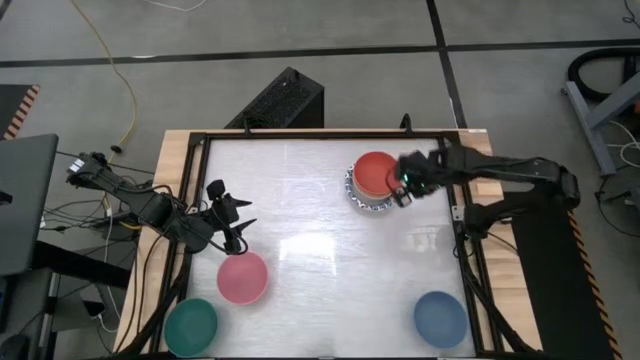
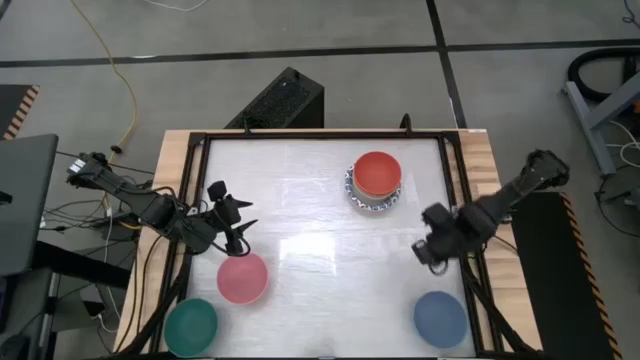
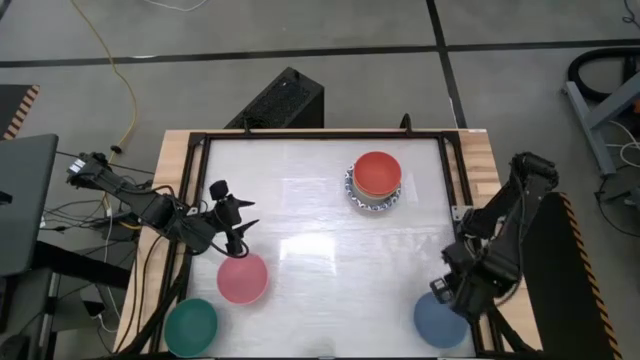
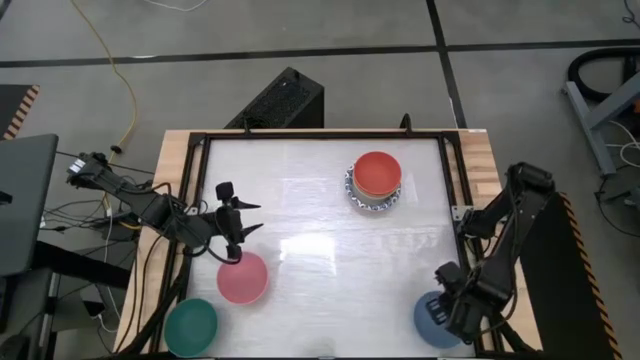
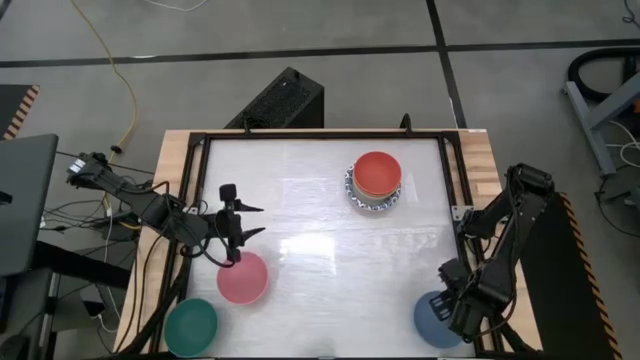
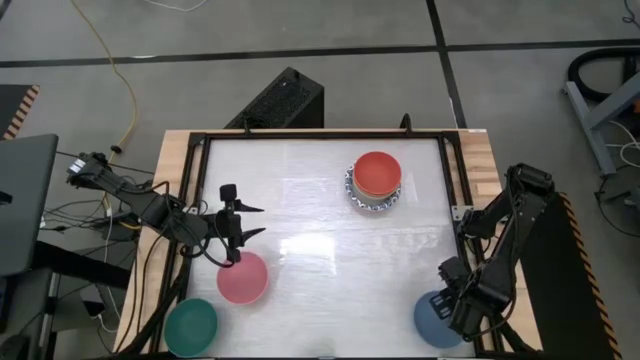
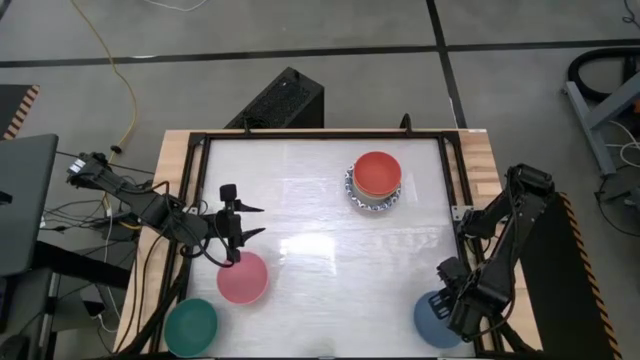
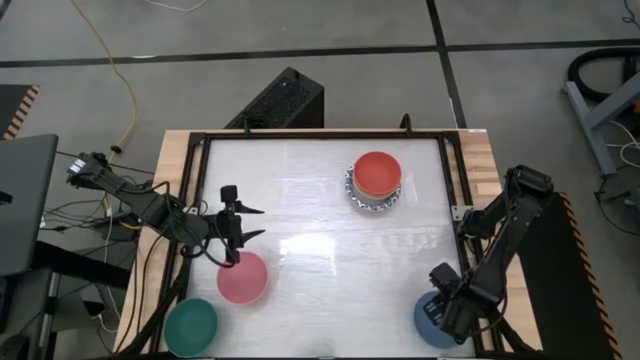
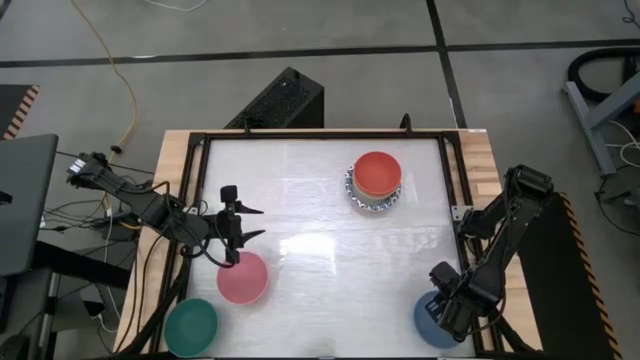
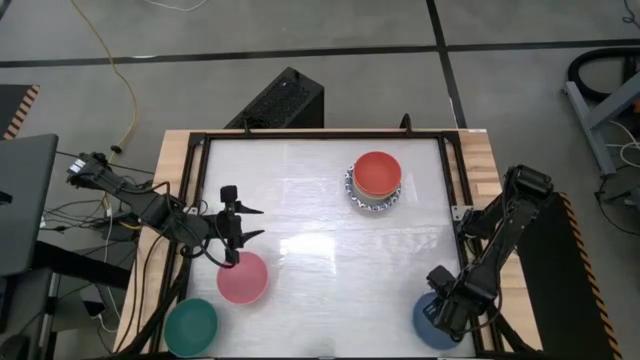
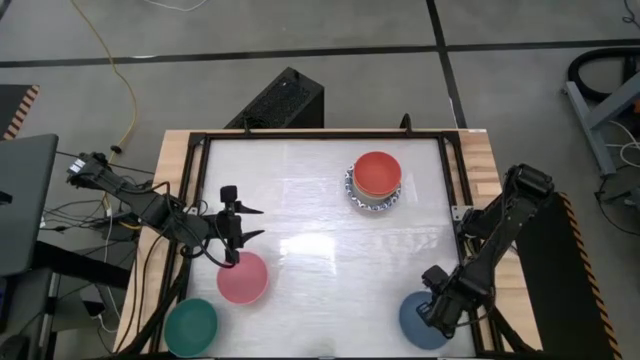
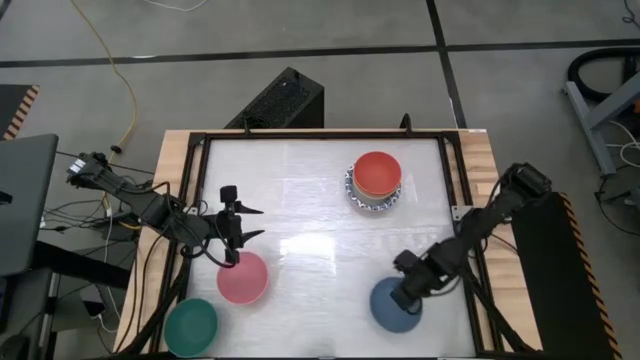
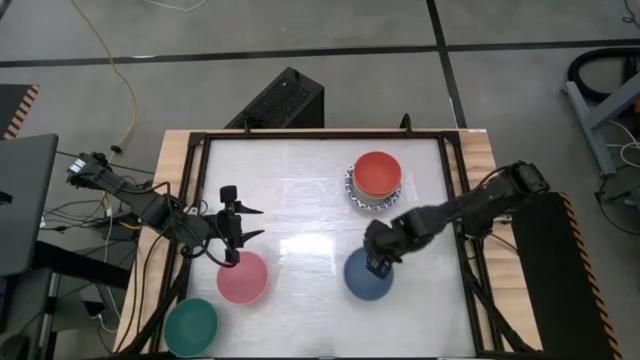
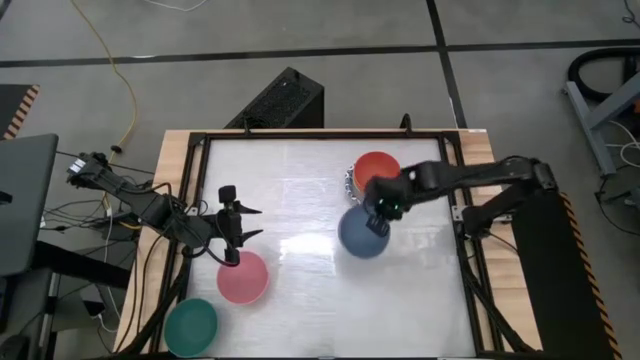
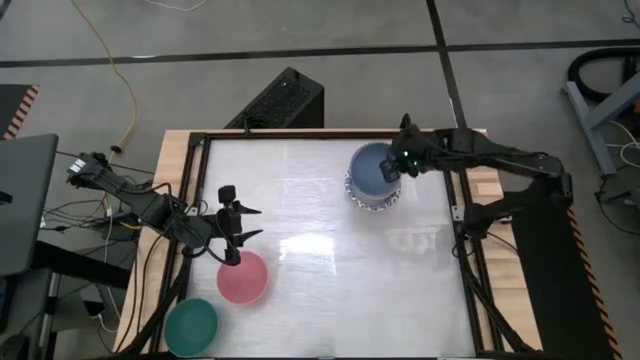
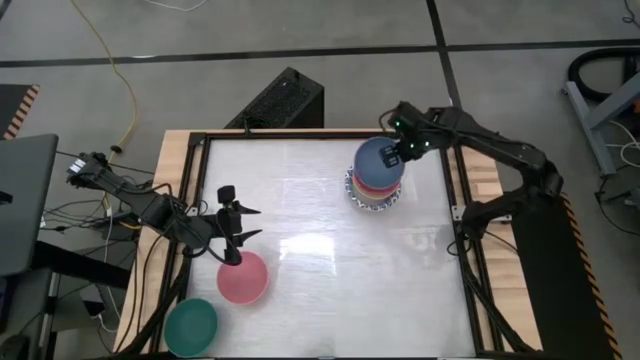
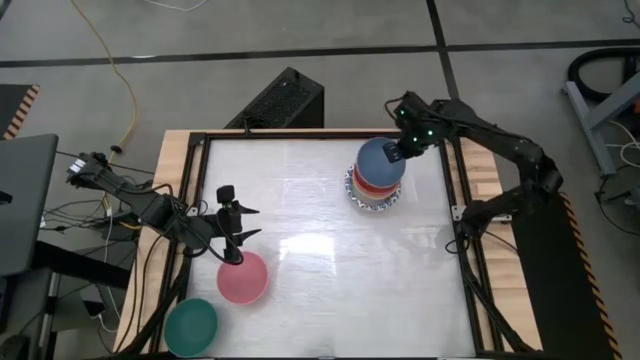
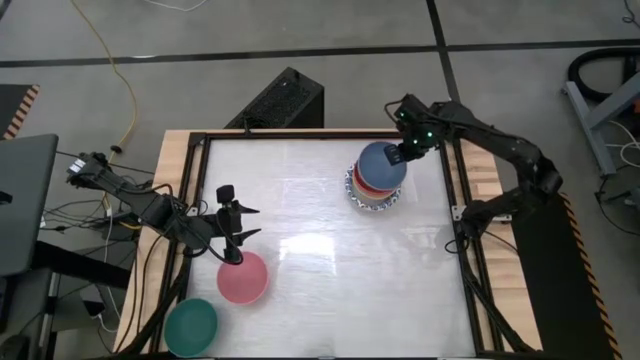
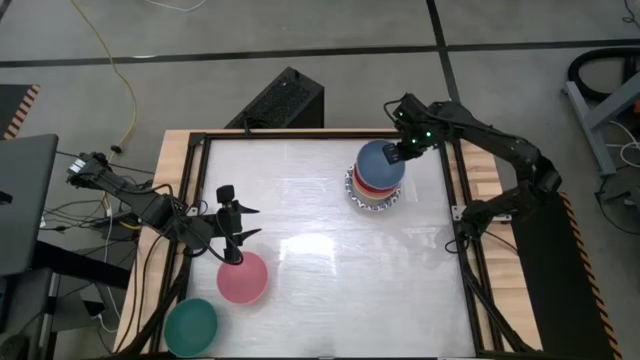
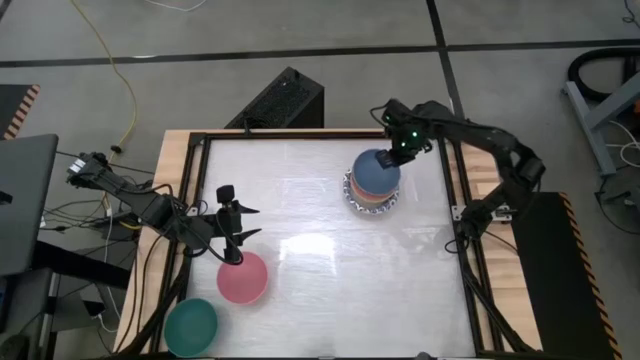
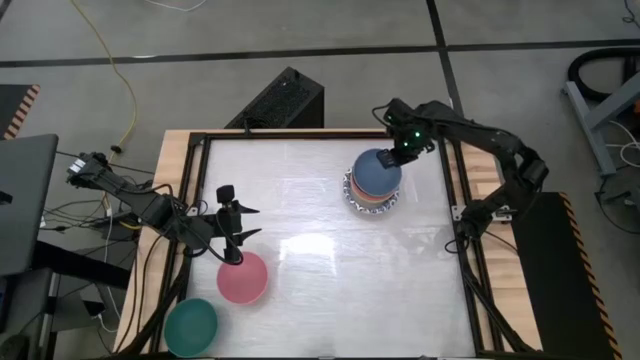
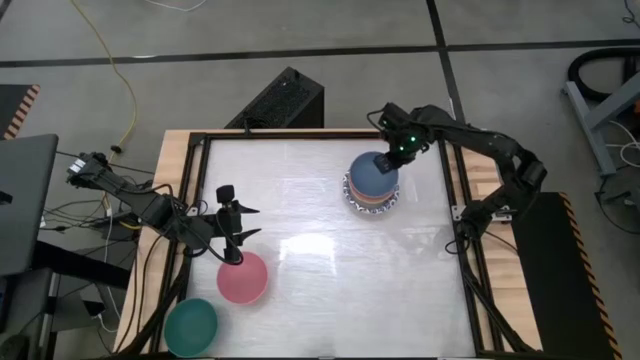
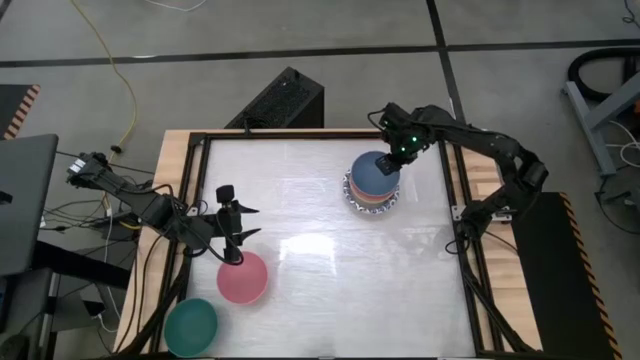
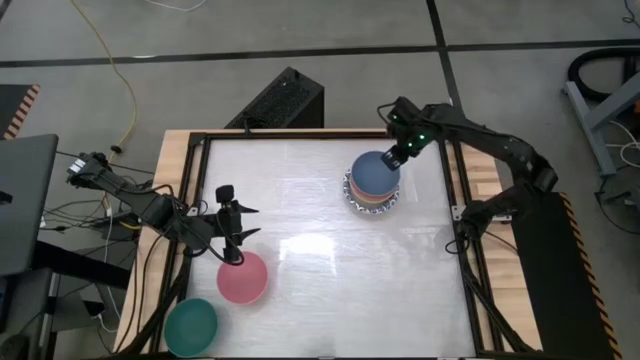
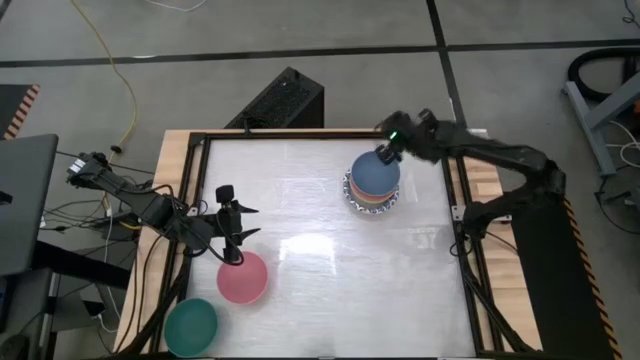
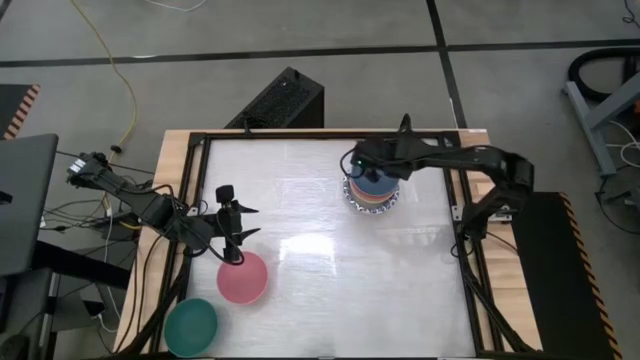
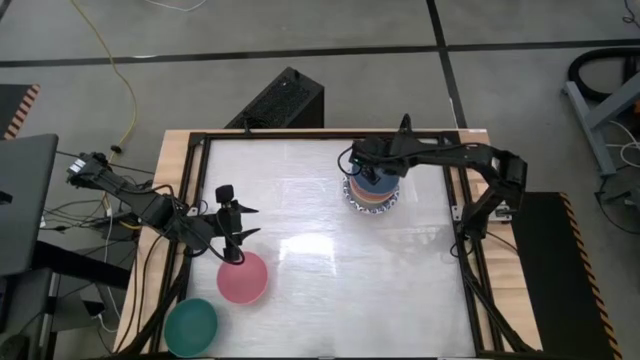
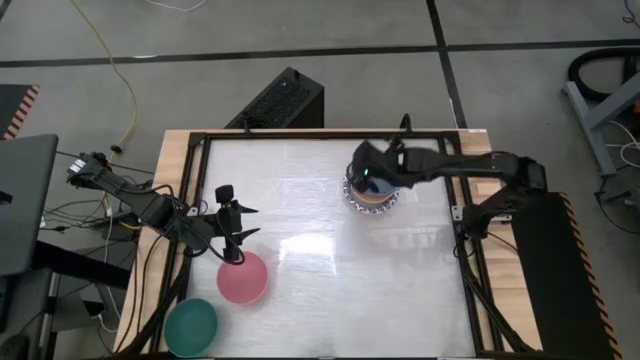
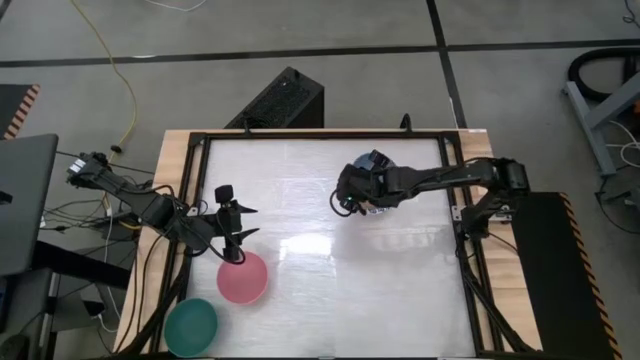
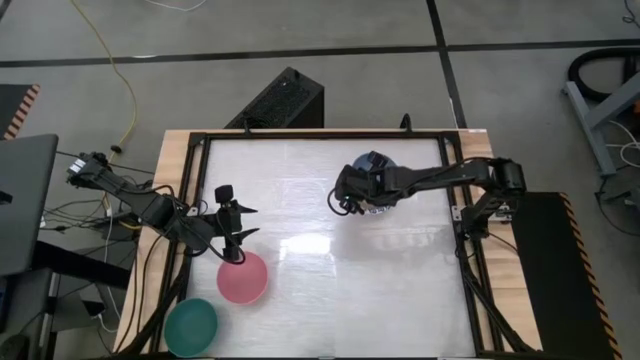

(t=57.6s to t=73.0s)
Stack the blue bowl on top of the orange bowl
